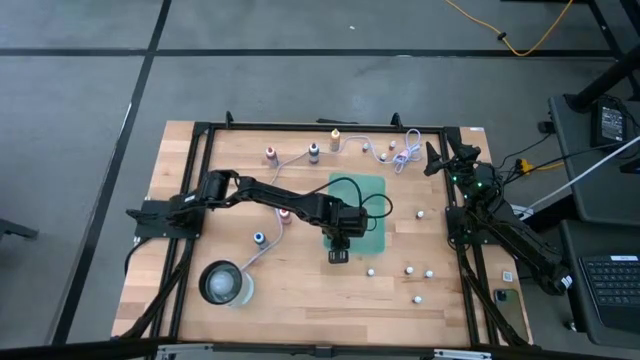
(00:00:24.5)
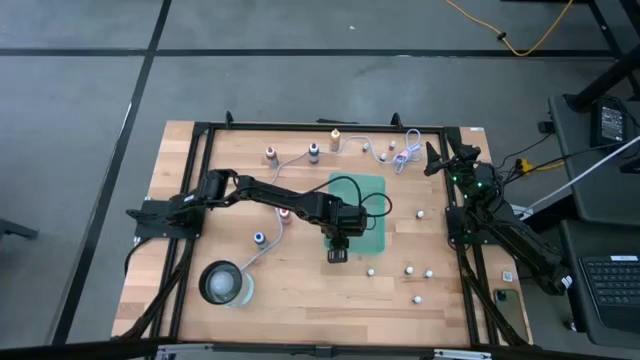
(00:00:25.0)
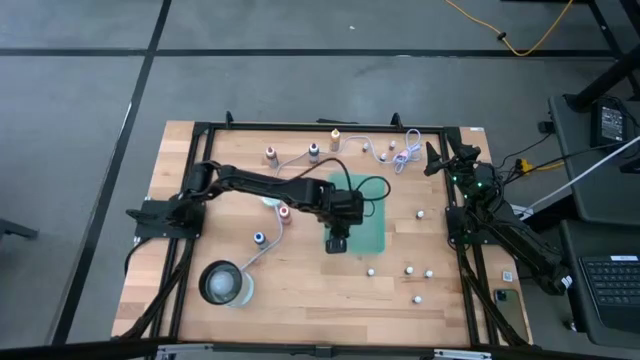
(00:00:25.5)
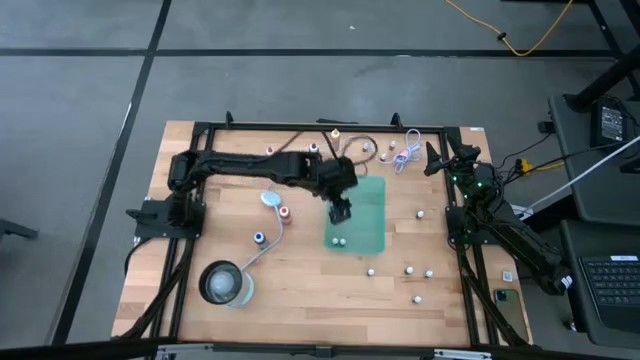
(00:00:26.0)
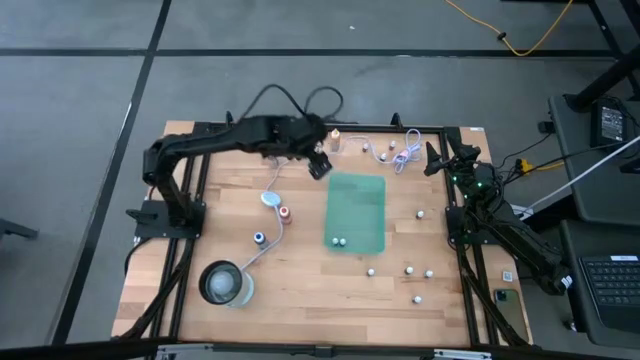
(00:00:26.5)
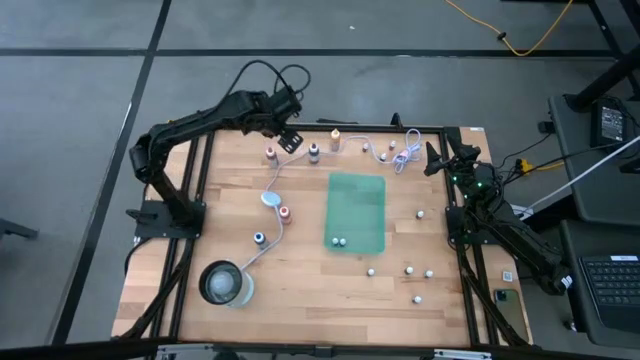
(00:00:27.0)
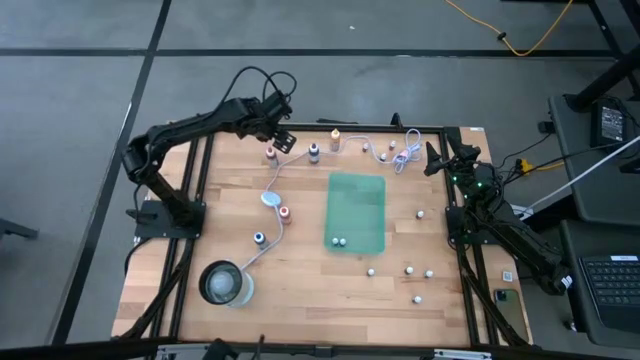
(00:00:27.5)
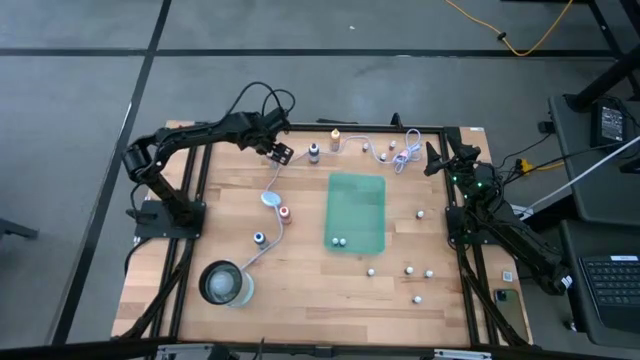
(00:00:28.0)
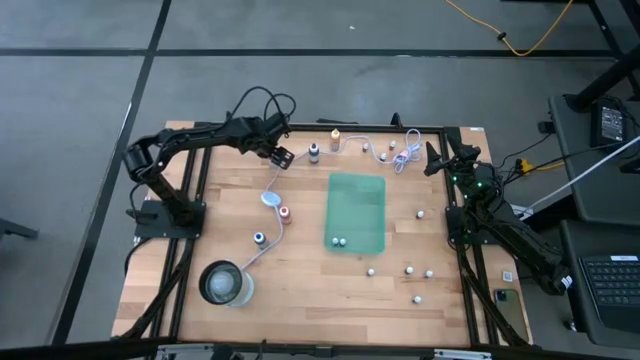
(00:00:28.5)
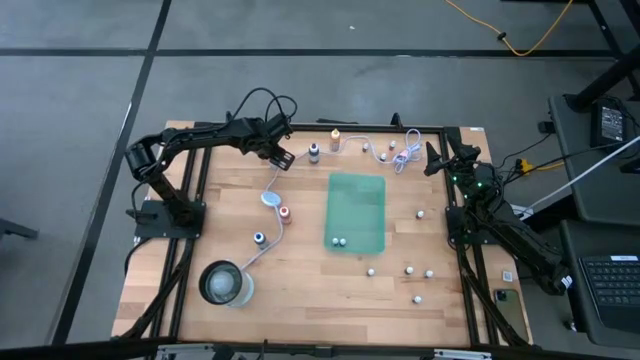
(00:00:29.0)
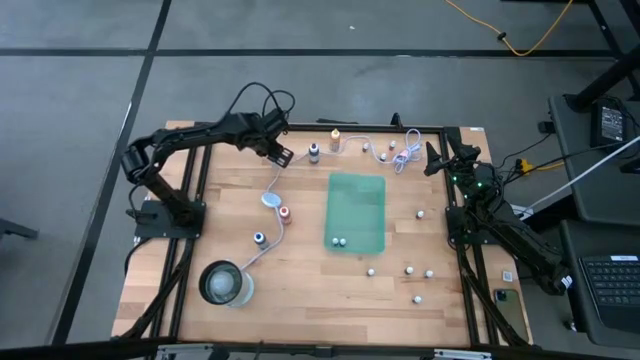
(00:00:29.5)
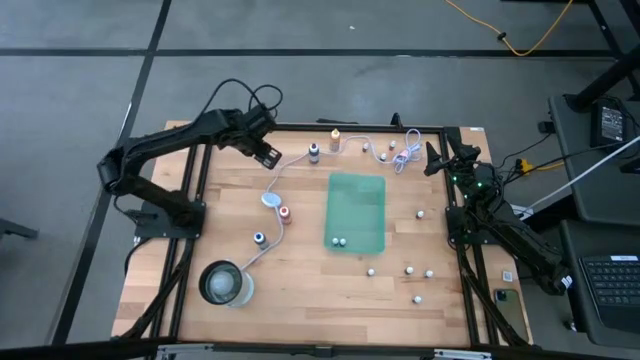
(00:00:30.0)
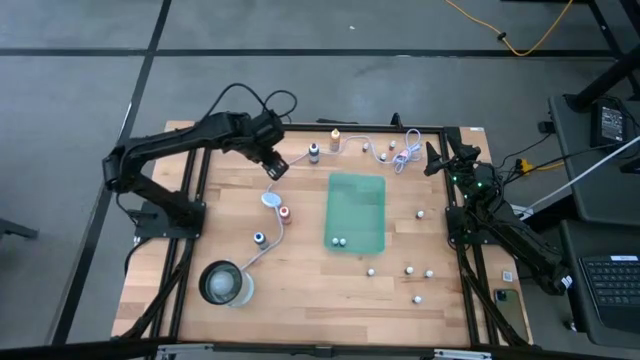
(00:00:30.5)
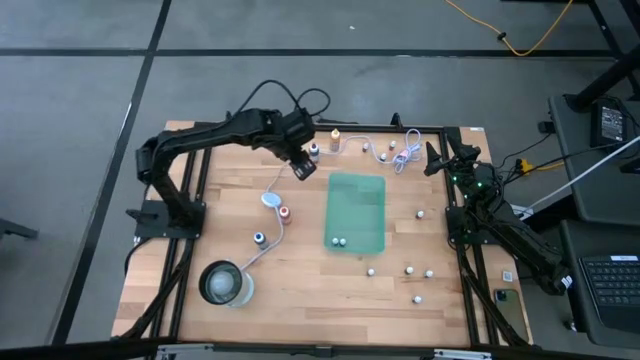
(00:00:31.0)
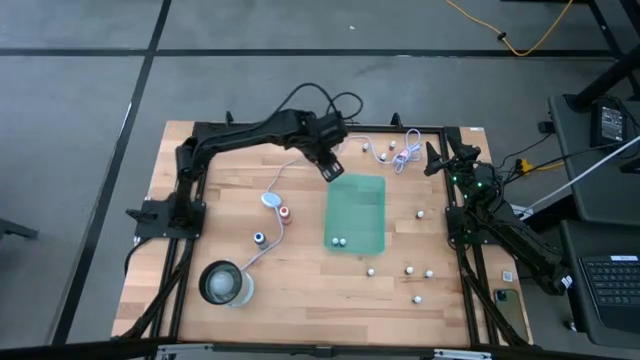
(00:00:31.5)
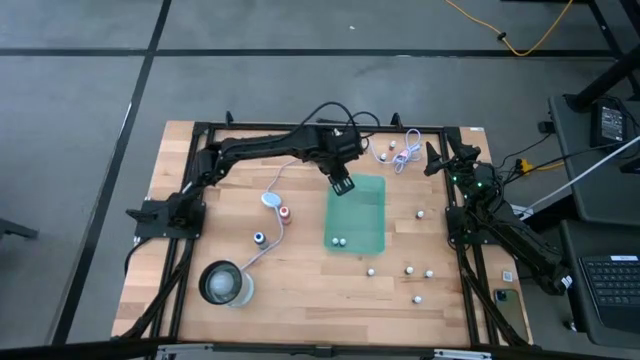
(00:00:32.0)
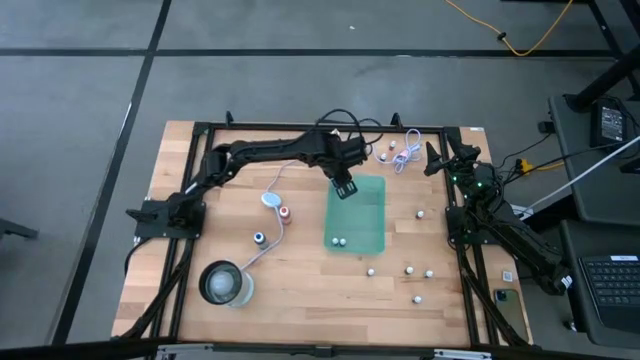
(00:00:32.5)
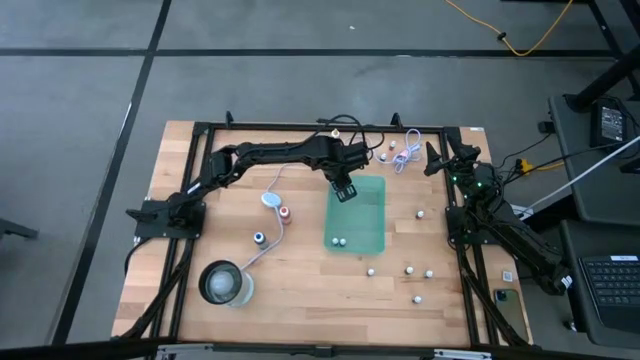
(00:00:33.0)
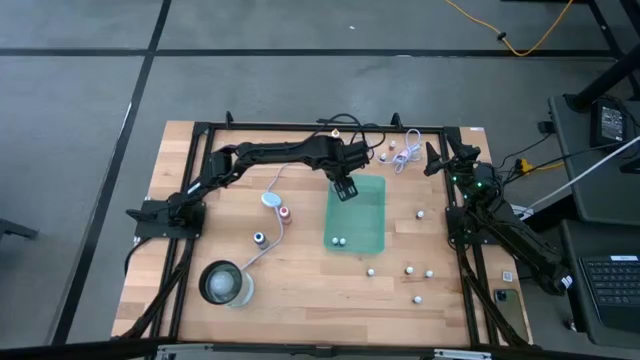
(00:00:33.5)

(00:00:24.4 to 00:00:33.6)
Task: Pick & Place food coloring
Put the big pink food coloring bottle into the green bin

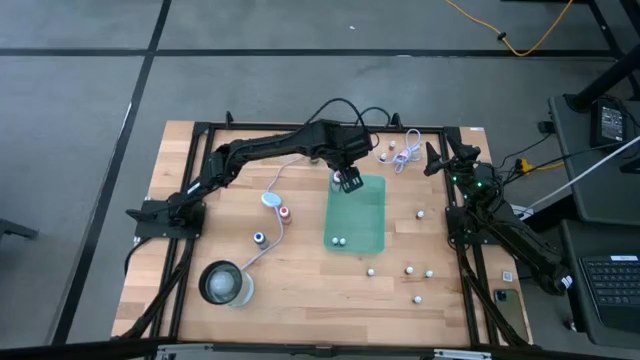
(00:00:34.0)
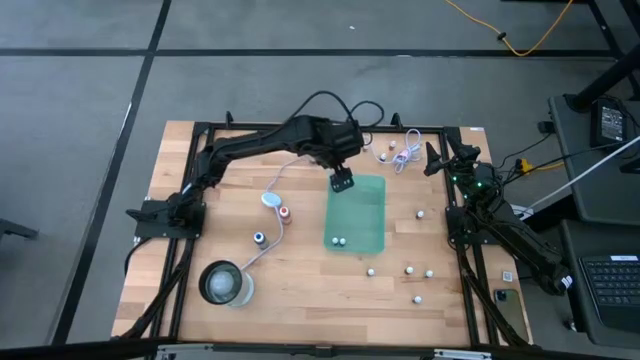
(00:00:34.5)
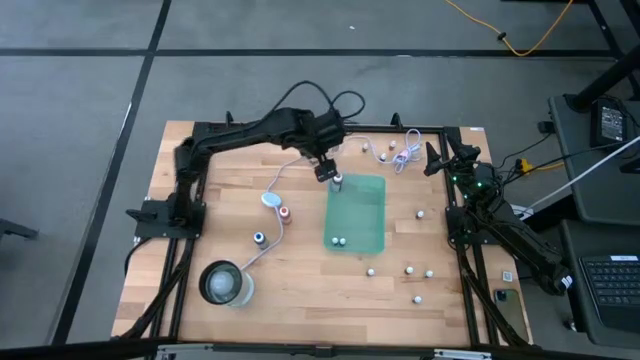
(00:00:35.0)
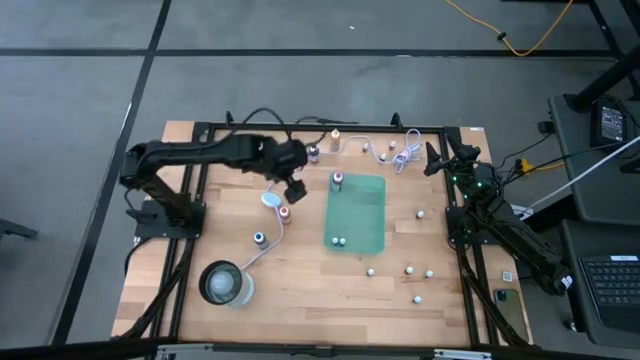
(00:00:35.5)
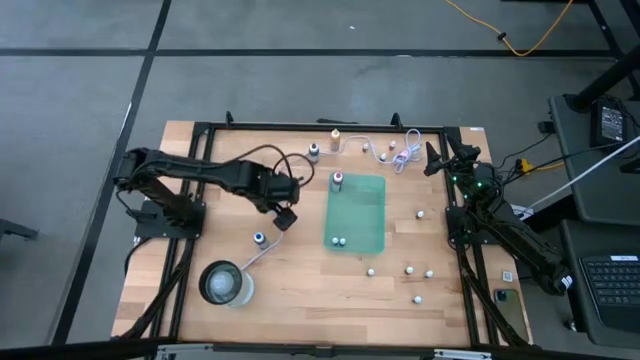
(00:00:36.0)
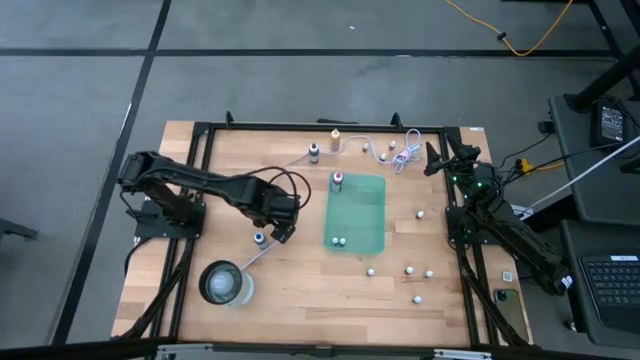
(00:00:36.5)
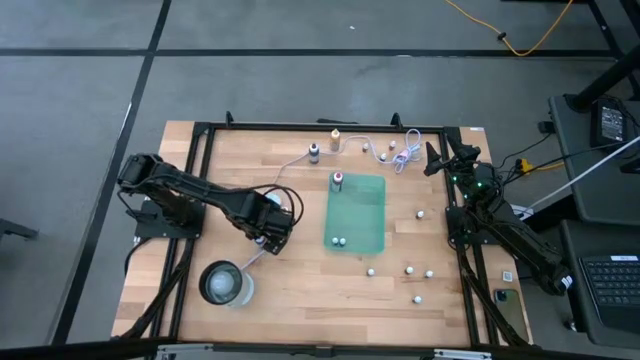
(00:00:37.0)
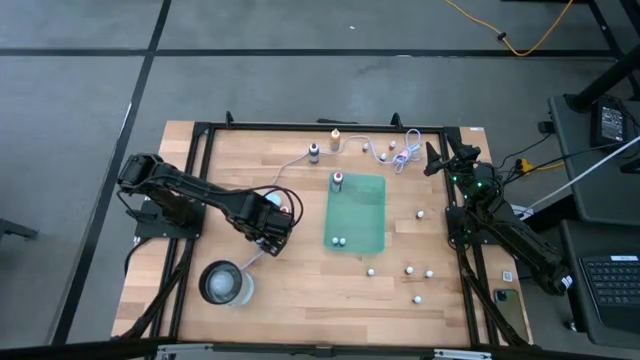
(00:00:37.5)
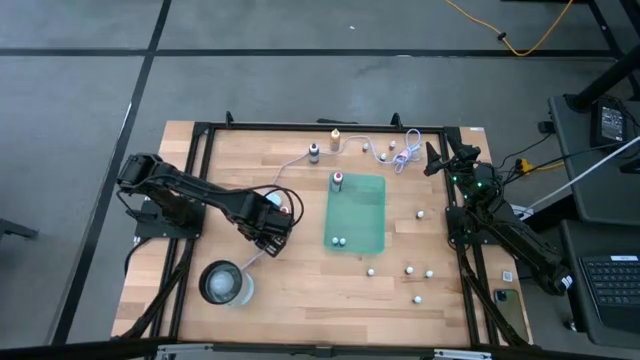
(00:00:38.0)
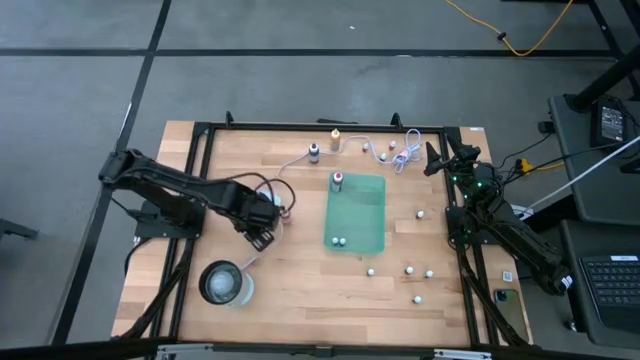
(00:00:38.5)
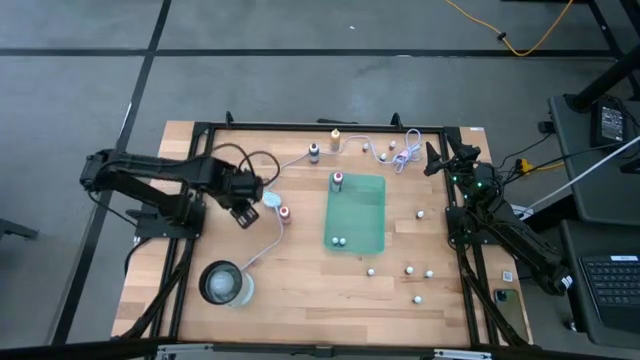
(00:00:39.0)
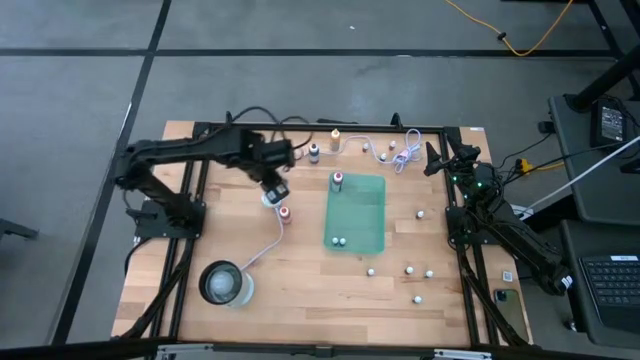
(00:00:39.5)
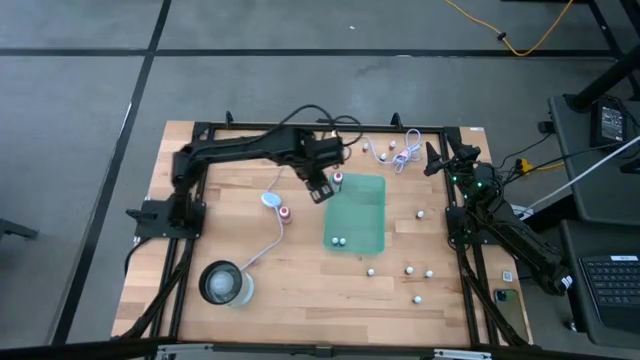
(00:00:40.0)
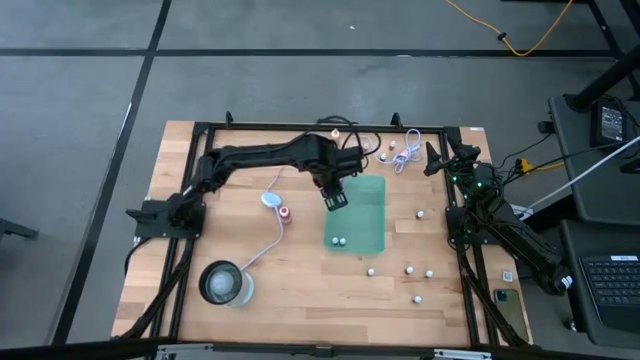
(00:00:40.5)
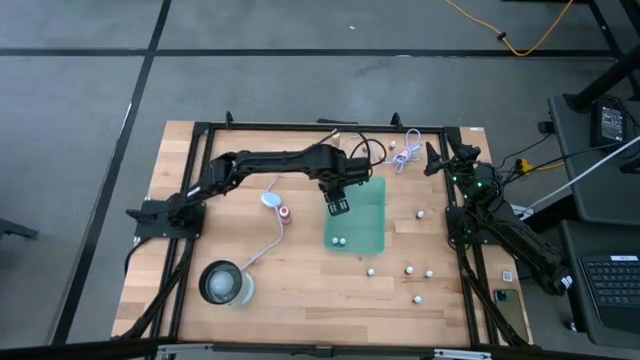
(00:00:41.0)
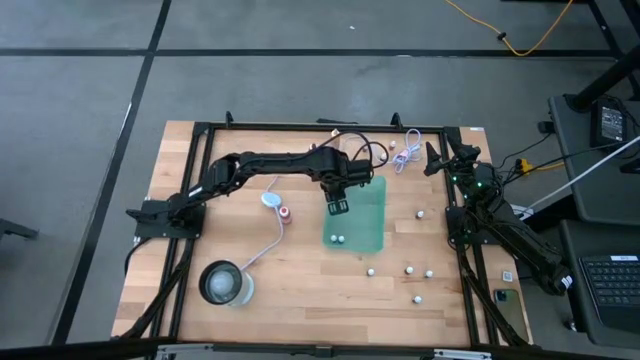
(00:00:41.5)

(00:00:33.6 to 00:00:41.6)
Put the big blue food coloring bottle into the green bin

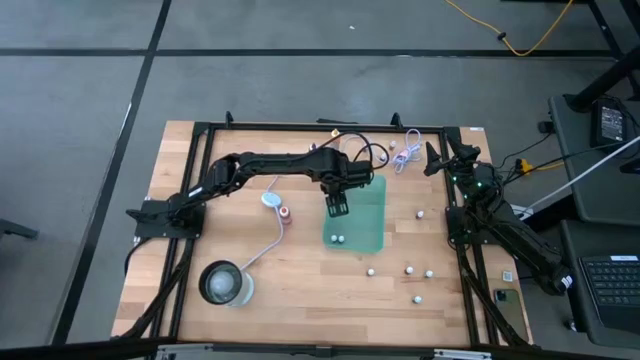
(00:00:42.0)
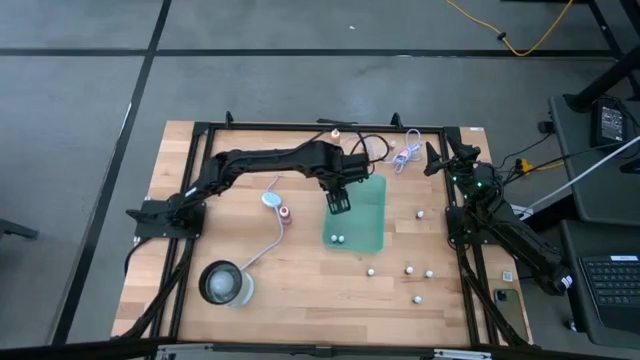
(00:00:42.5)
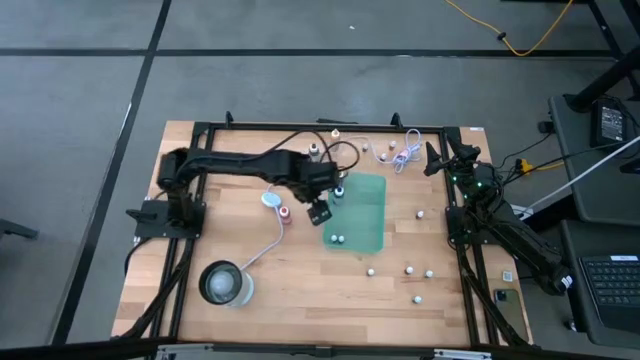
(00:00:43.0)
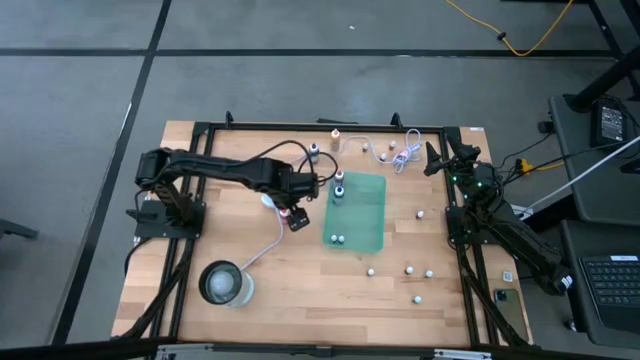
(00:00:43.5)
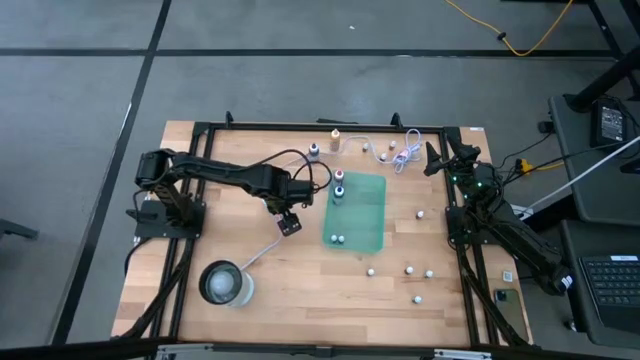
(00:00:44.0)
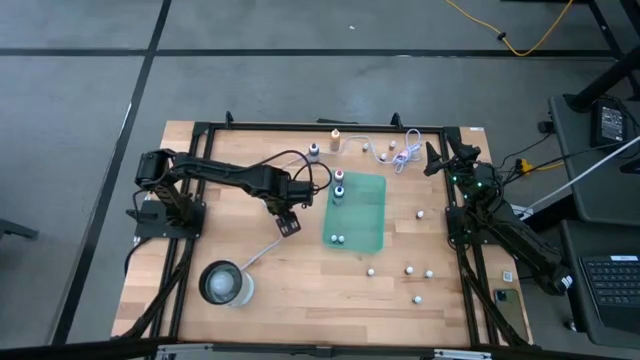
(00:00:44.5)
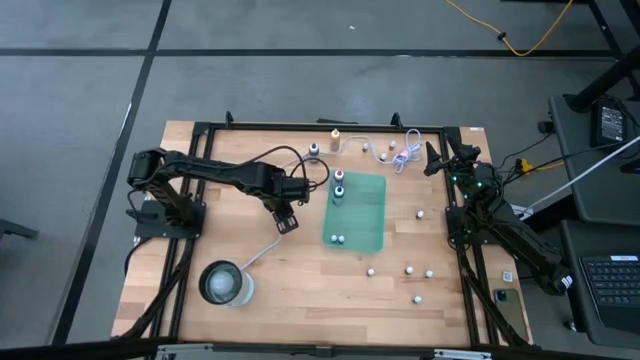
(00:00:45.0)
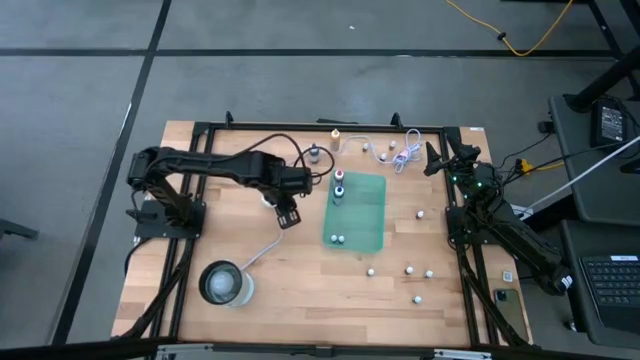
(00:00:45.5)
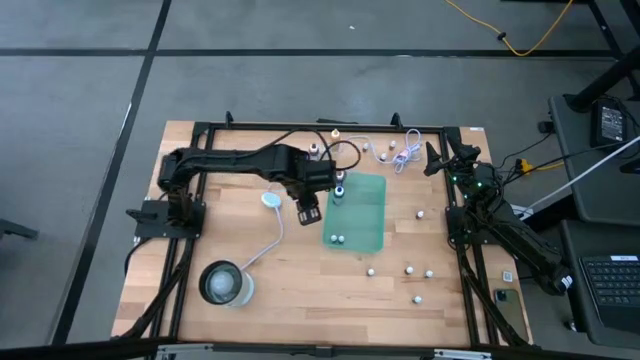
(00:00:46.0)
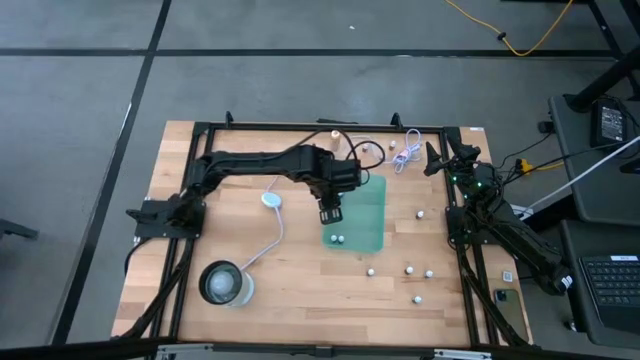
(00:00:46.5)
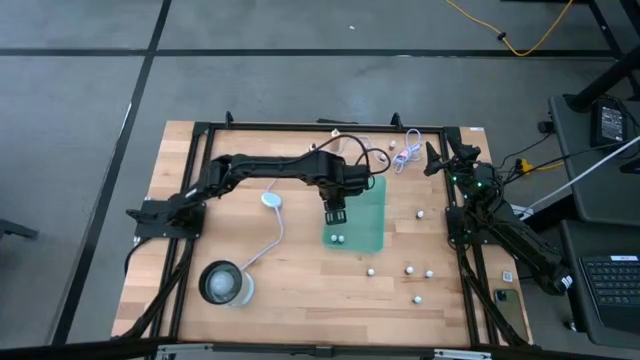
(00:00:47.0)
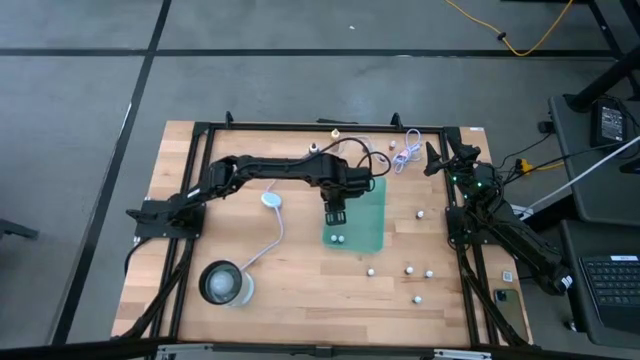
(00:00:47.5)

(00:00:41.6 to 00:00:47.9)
Put the big orange food coloring bottle into the green bin
